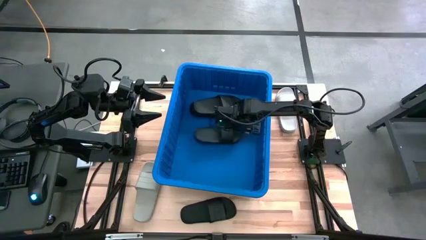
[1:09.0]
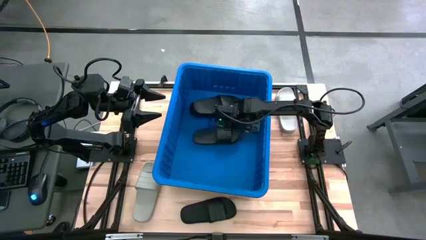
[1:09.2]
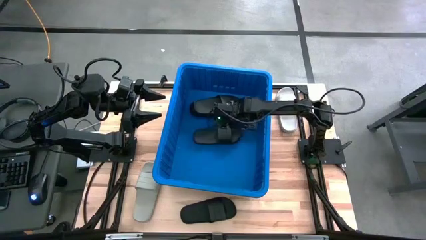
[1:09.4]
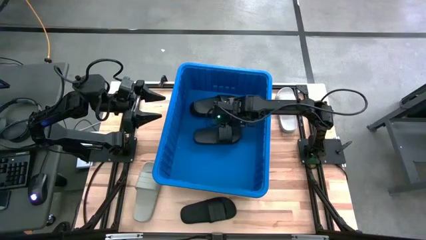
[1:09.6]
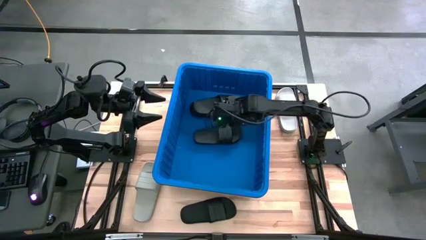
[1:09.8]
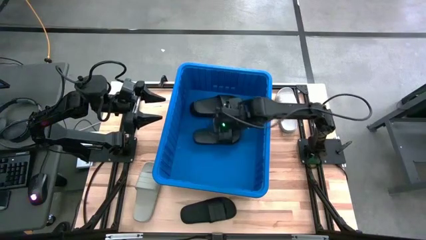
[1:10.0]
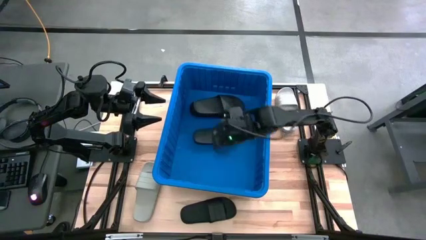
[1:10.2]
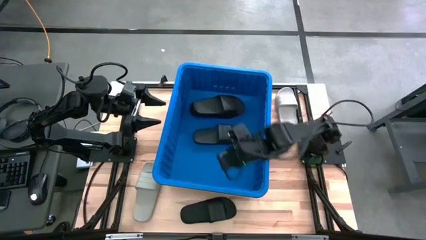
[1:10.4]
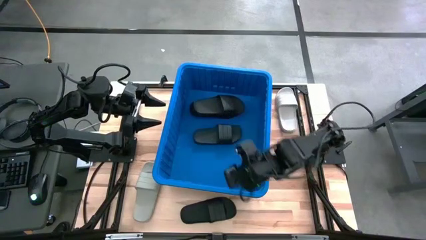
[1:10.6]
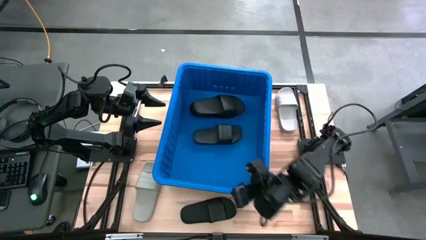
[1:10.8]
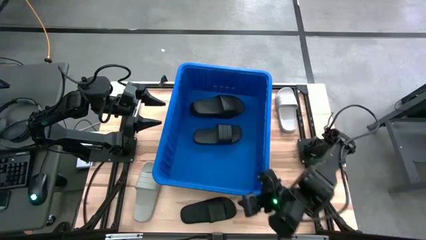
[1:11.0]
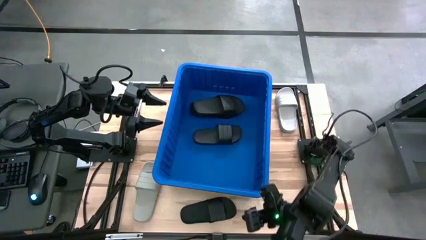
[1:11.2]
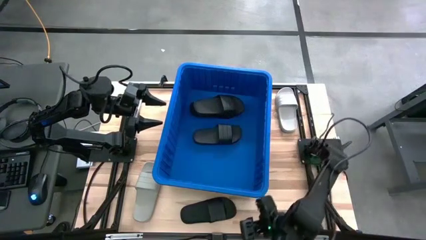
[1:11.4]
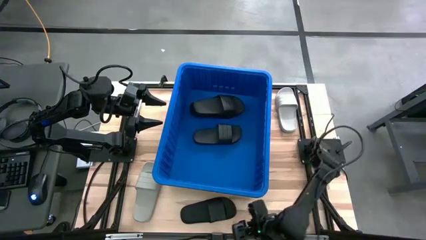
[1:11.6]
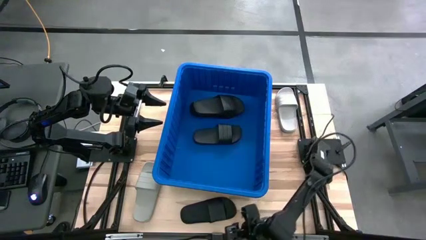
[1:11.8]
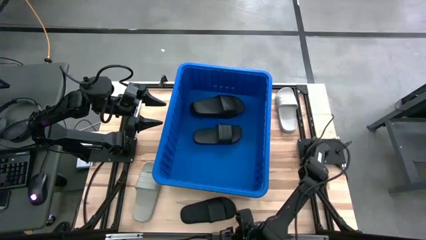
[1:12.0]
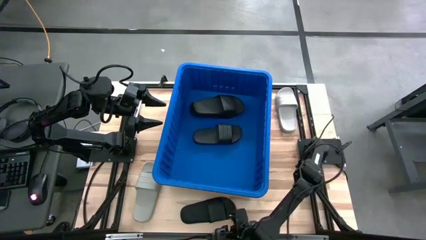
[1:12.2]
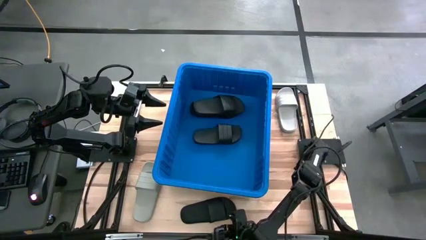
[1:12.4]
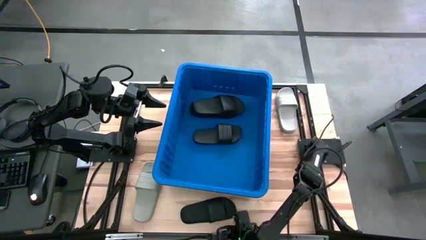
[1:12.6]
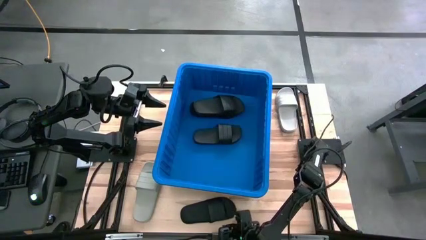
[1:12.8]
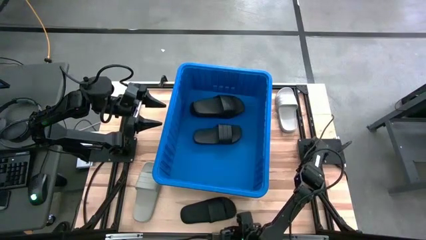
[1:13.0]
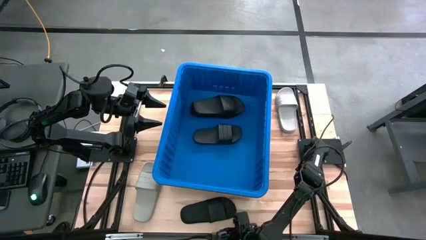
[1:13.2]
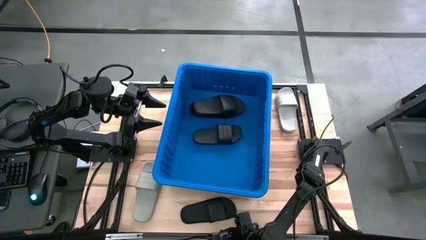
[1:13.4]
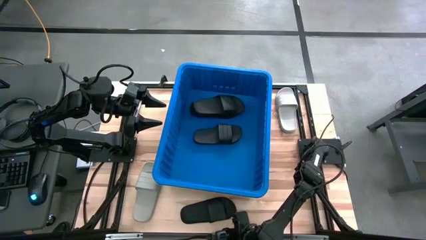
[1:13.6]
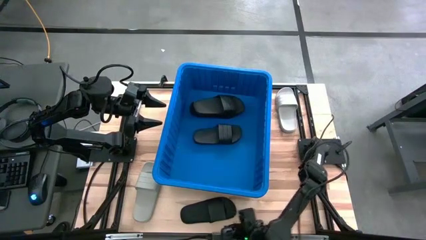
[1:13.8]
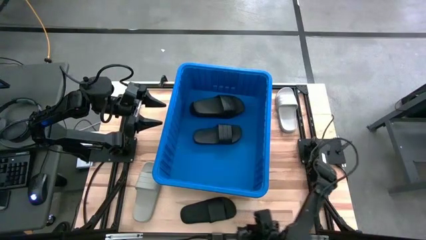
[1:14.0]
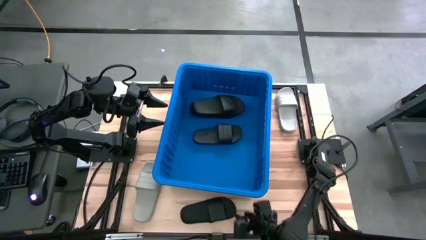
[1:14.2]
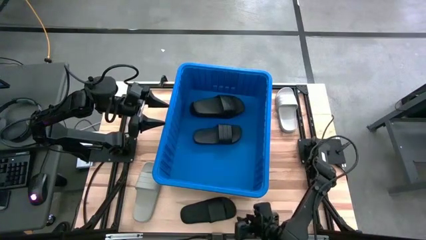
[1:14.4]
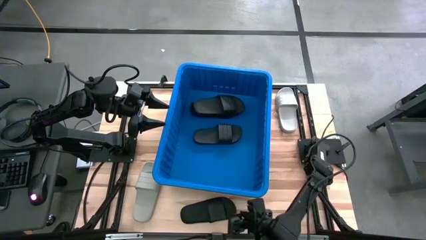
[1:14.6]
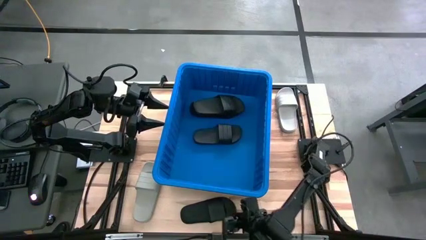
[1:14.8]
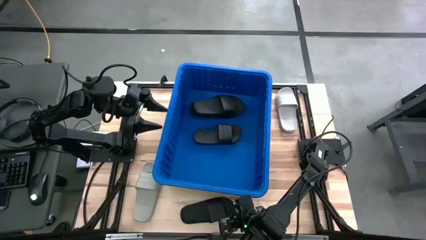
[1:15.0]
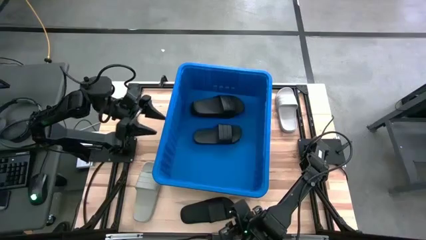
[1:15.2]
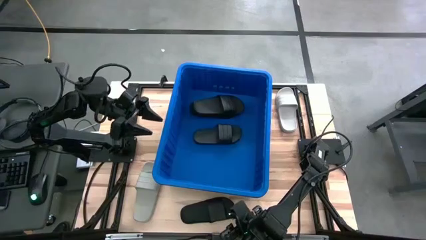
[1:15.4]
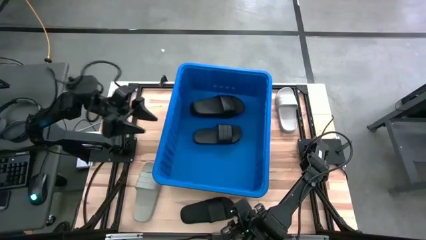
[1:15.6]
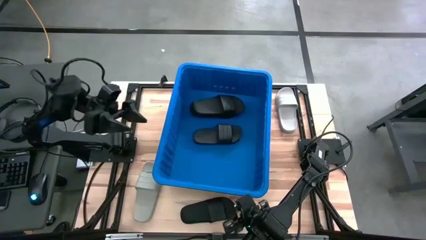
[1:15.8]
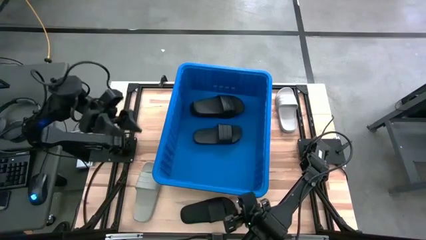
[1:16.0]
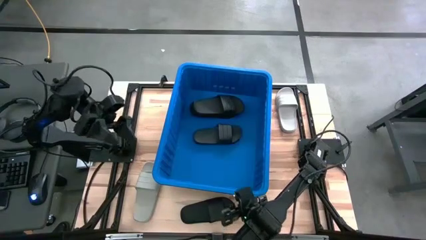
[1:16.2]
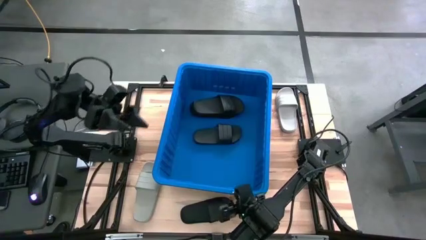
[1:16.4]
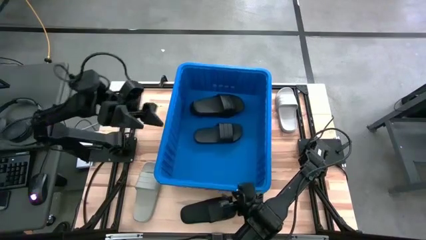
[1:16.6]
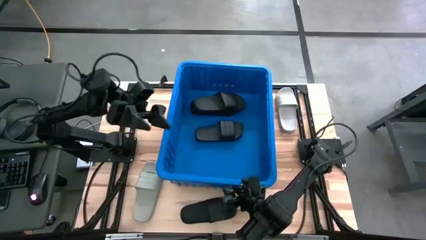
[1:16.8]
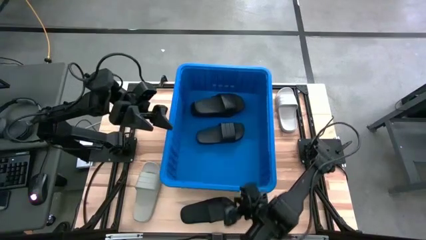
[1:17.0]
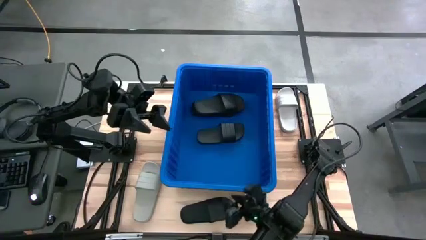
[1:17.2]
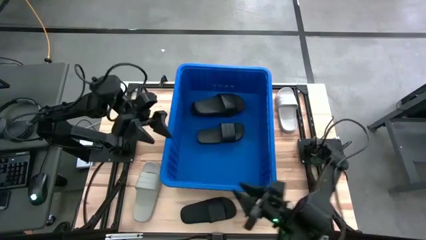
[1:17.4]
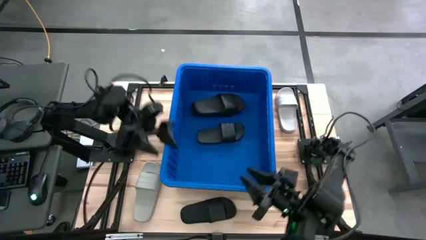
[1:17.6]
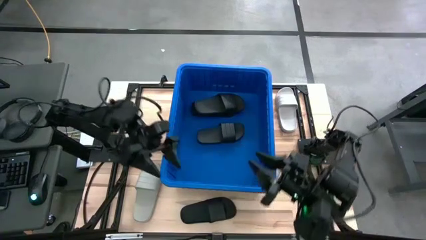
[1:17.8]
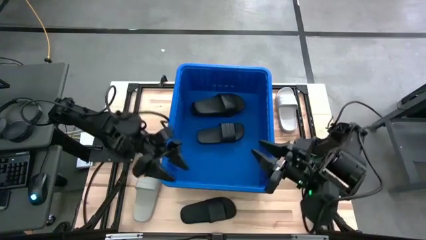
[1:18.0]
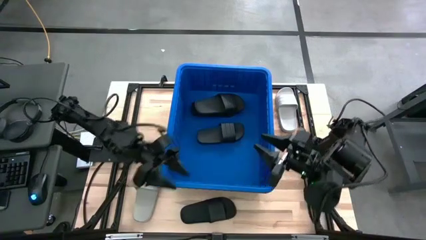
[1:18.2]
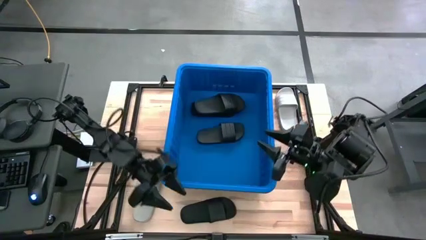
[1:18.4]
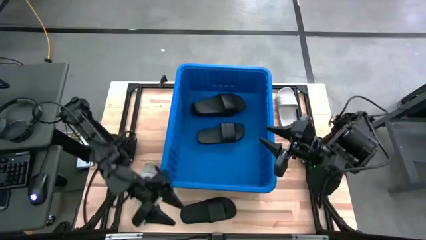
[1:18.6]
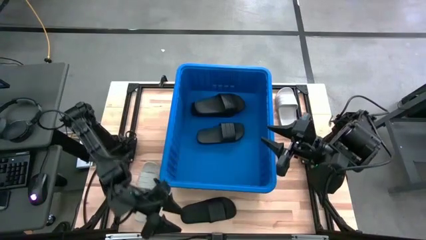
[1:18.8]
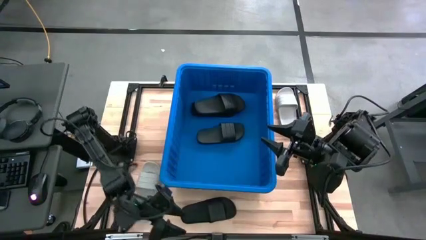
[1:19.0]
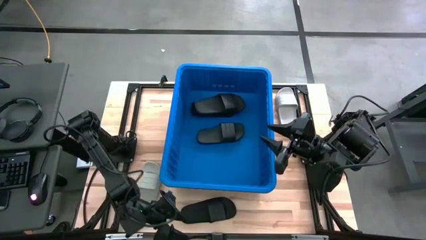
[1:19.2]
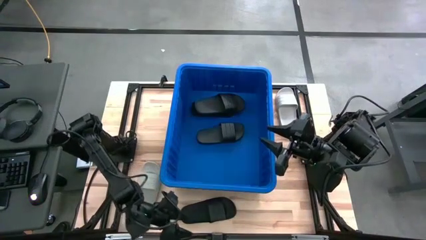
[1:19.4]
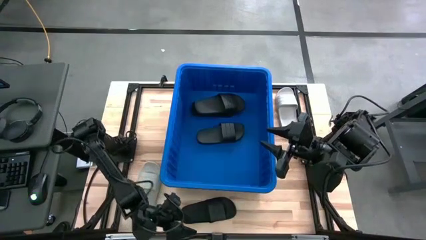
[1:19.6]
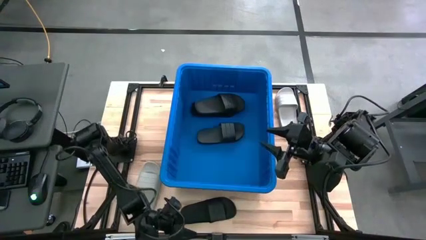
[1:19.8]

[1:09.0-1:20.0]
Task: Pick and place slides into bin
Put the black slide into the blue container

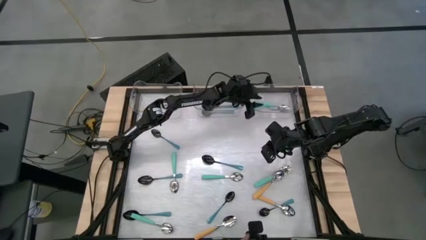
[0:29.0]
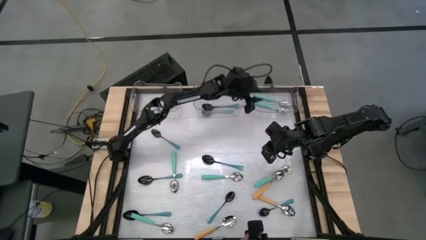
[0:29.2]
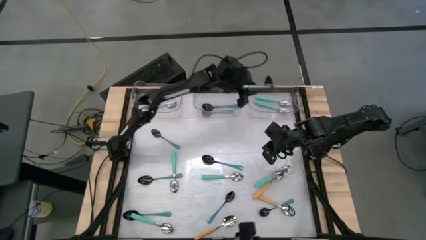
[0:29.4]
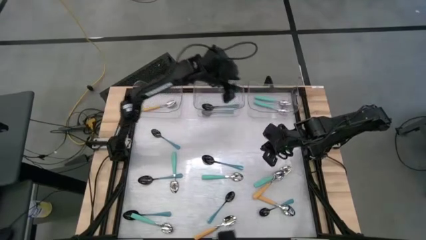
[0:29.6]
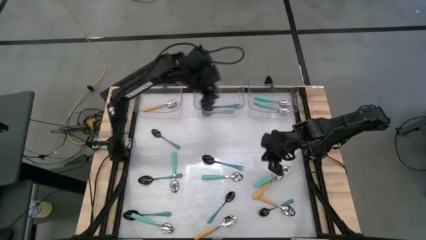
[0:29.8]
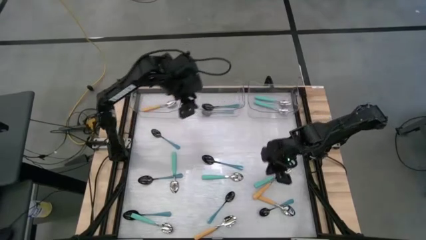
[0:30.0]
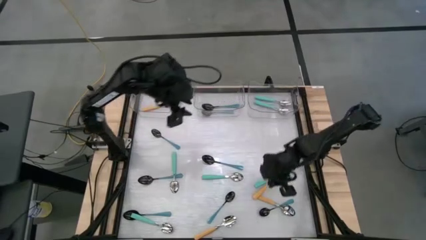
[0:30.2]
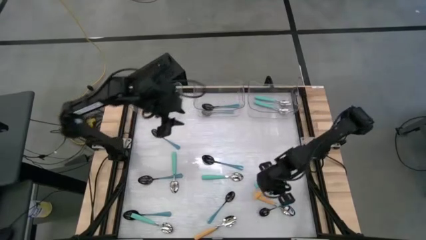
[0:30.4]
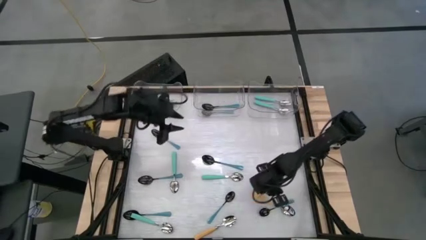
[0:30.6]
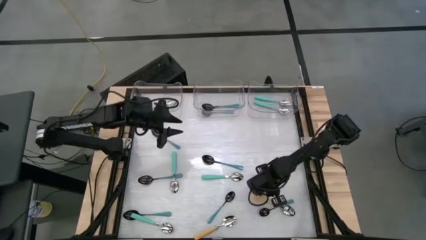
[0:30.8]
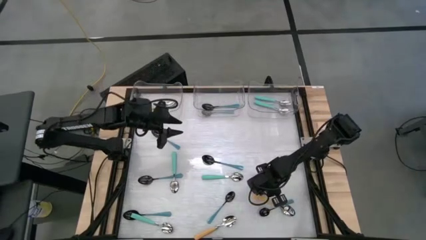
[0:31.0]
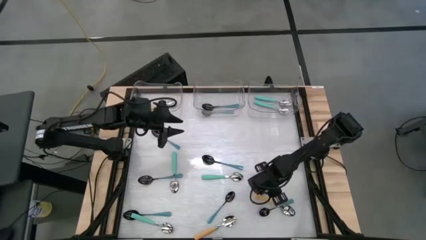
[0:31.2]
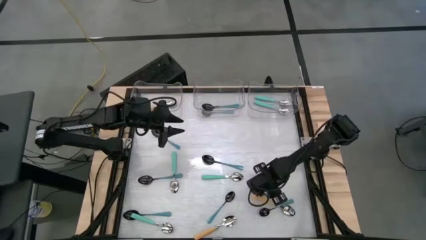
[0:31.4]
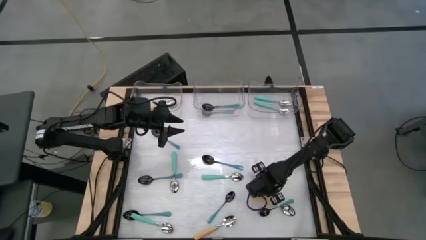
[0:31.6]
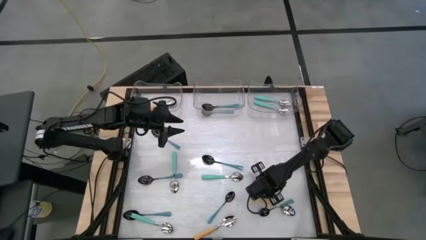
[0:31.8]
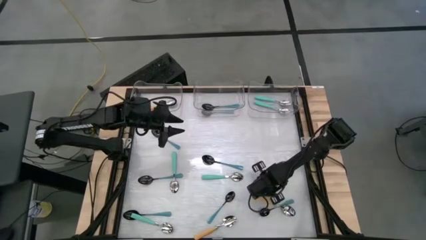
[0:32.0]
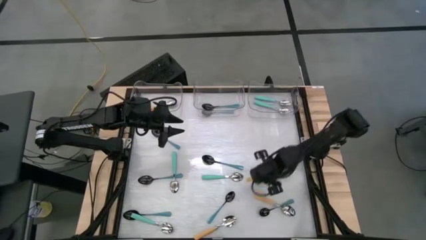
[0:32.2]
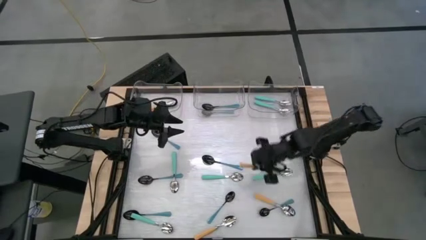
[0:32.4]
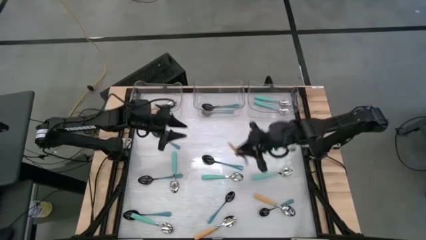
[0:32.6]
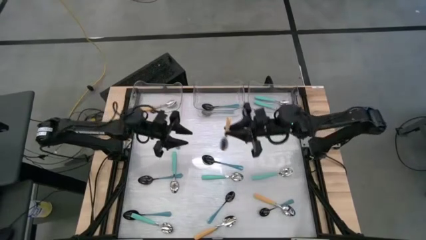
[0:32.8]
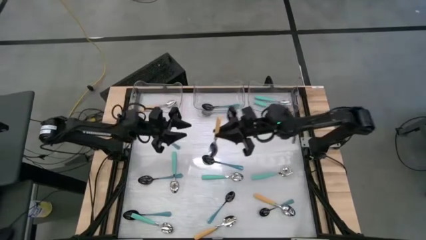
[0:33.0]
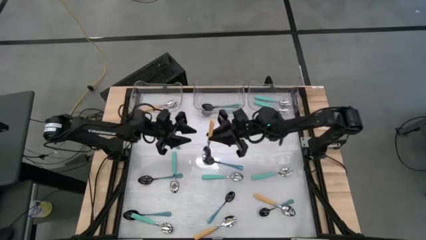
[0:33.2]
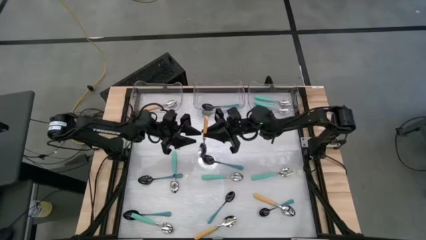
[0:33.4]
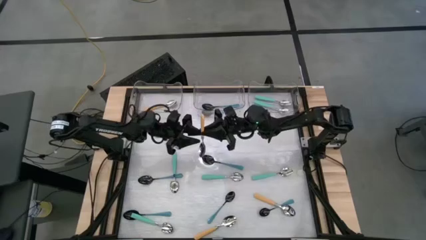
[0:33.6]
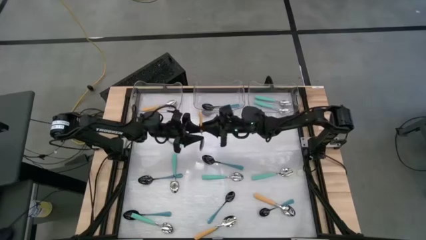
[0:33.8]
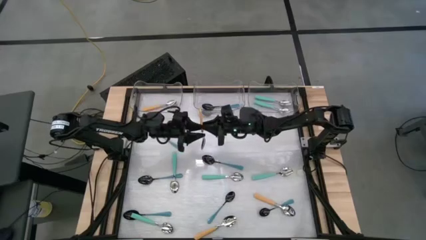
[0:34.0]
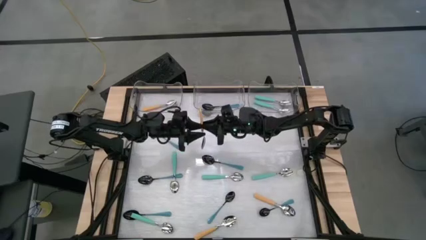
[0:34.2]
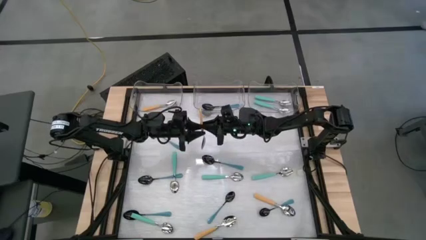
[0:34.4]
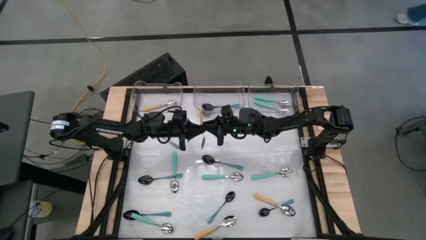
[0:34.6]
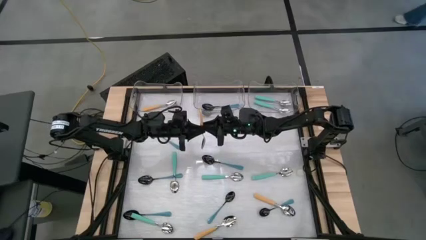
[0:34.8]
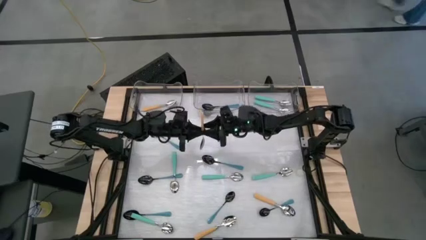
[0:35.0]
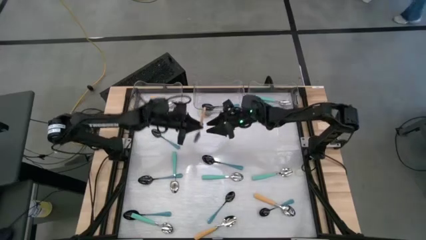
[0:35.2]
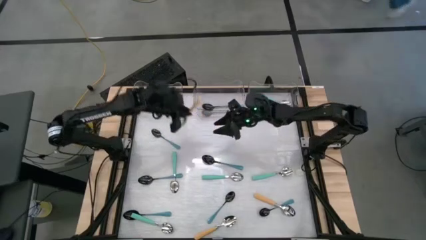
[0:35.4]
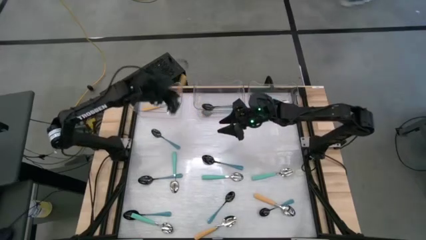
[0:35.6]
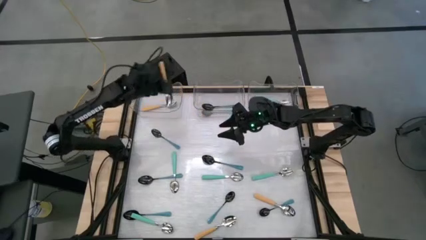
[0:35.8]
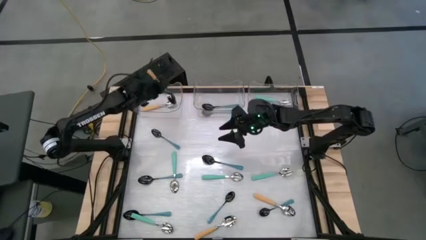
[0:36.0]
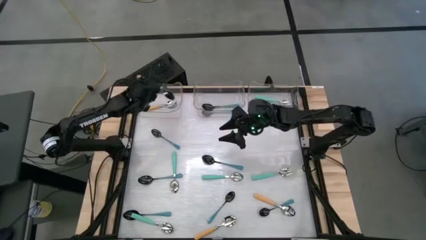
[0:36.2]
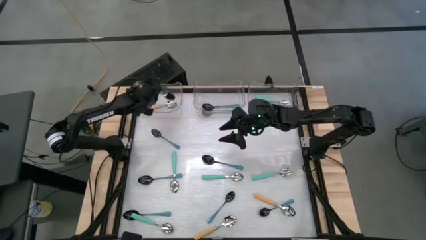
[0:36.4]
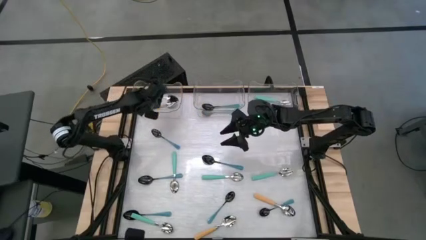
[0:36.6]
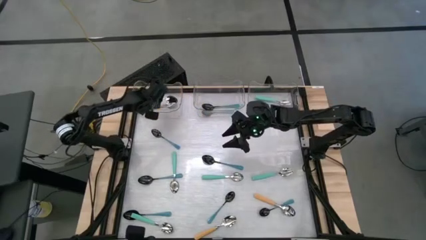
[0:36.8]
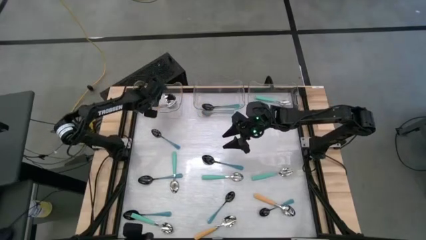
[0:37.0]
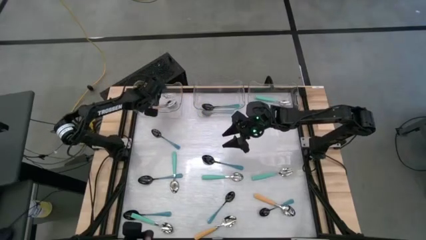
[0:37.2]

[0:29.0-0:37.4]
Task: Sort silverware by color (type)
Put the yellow spoon into the left transparent bin
